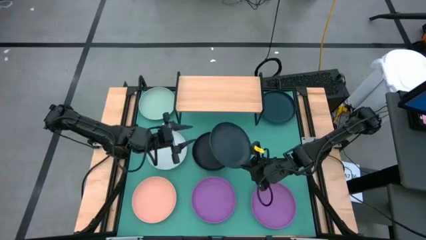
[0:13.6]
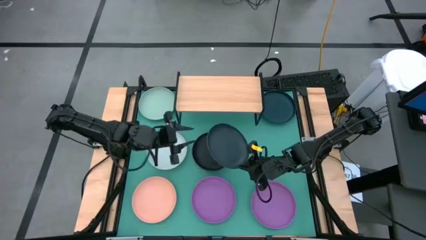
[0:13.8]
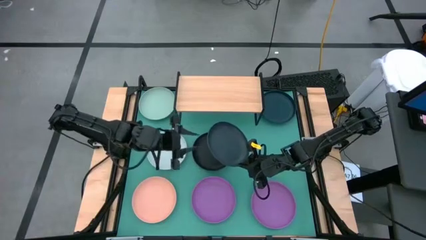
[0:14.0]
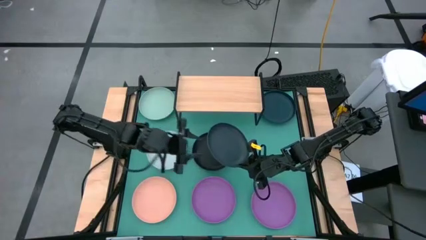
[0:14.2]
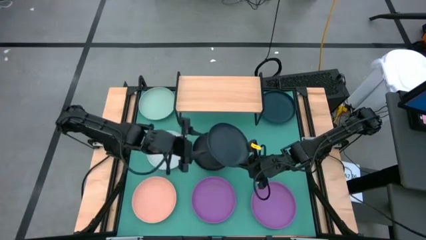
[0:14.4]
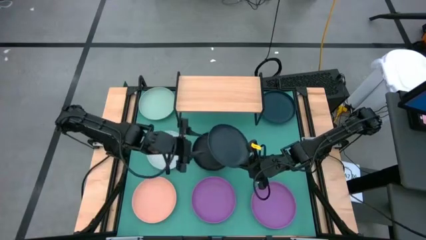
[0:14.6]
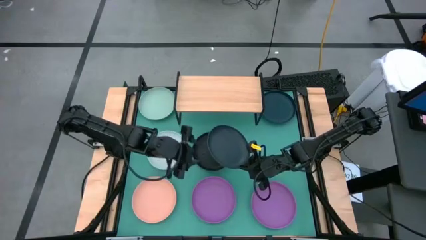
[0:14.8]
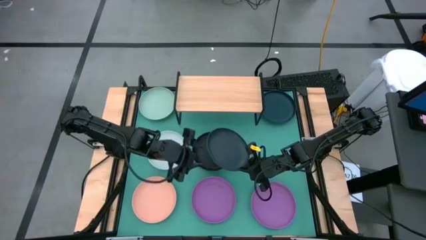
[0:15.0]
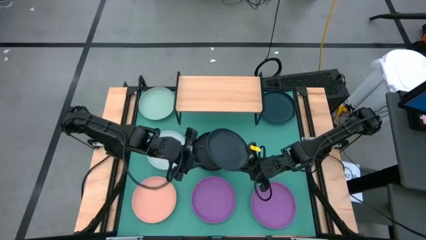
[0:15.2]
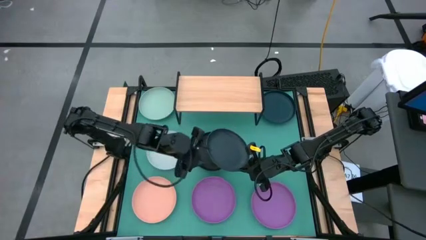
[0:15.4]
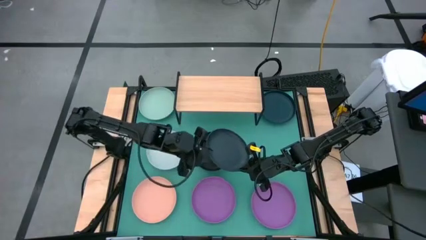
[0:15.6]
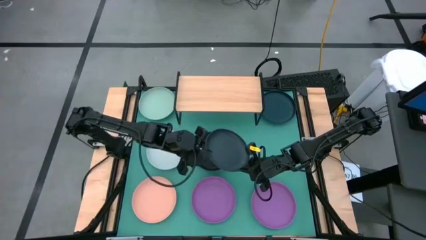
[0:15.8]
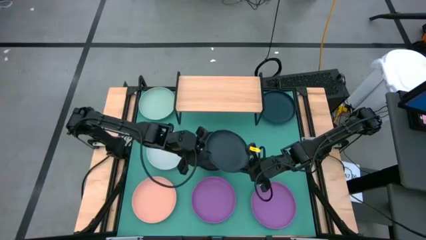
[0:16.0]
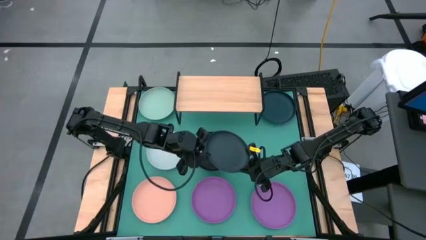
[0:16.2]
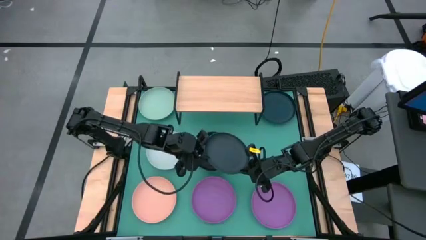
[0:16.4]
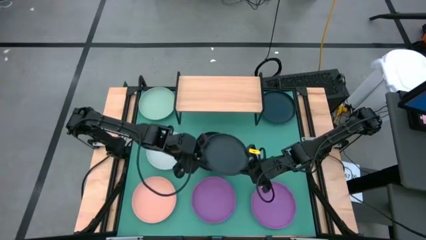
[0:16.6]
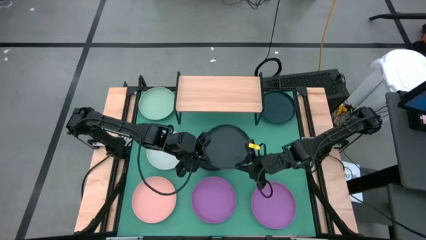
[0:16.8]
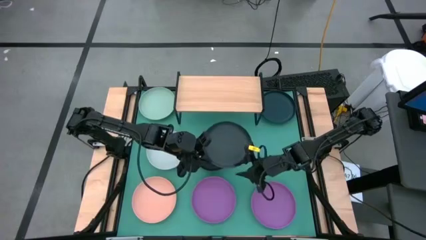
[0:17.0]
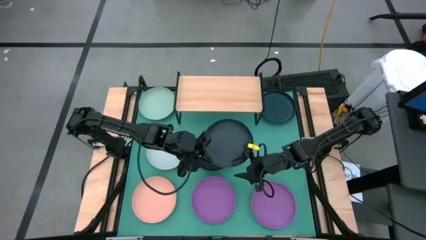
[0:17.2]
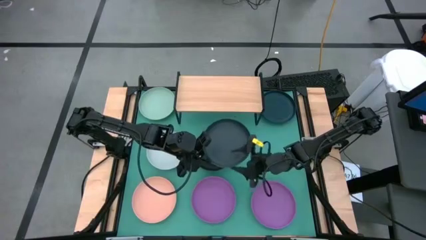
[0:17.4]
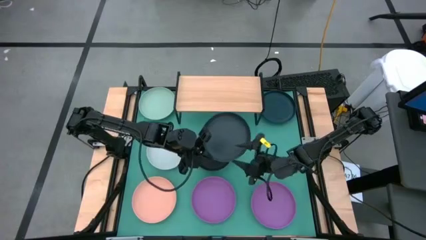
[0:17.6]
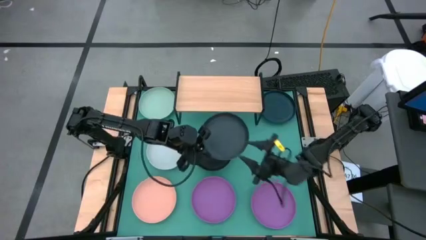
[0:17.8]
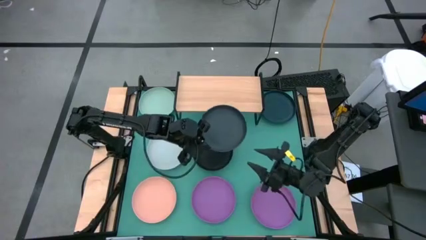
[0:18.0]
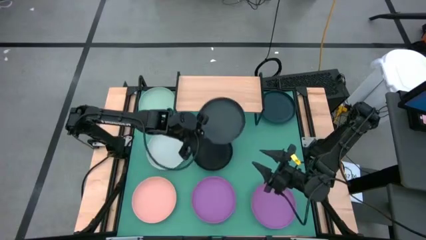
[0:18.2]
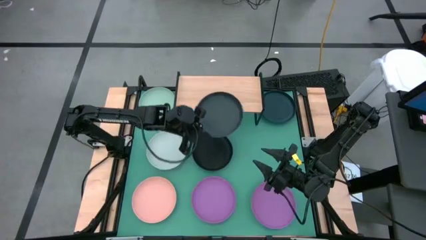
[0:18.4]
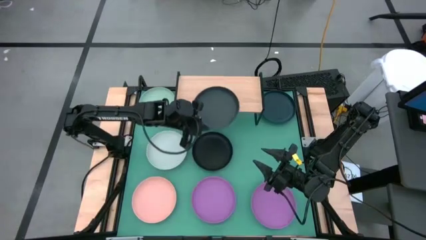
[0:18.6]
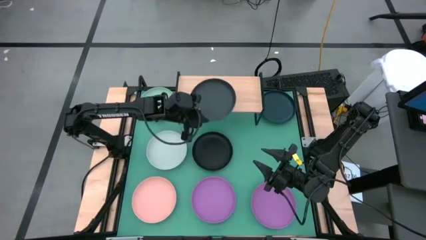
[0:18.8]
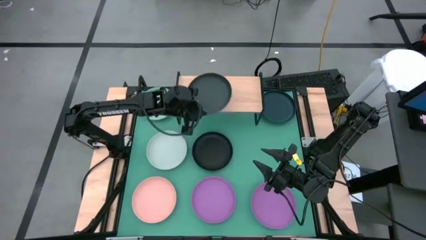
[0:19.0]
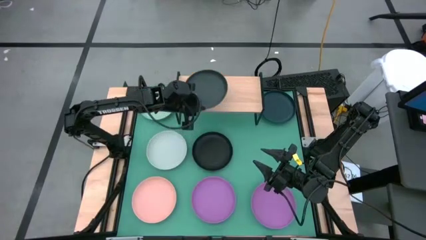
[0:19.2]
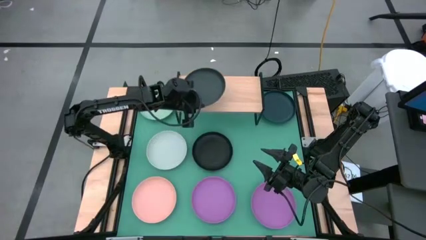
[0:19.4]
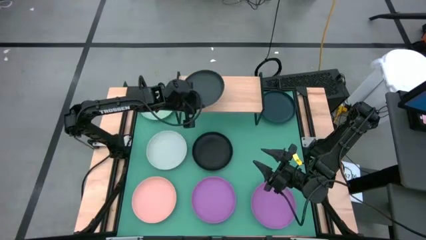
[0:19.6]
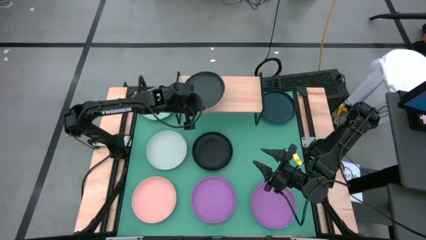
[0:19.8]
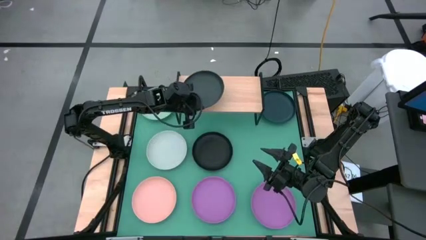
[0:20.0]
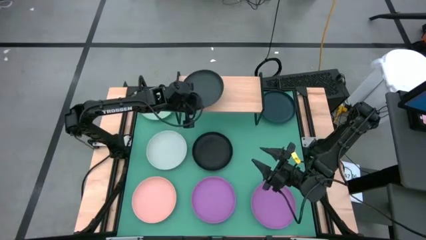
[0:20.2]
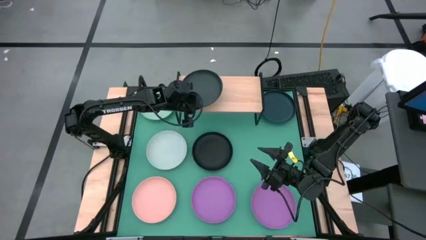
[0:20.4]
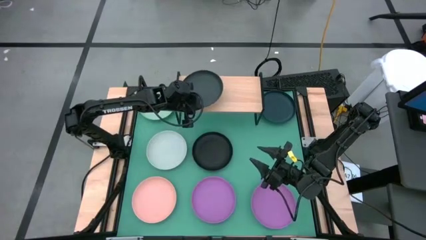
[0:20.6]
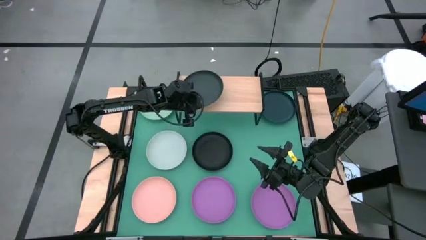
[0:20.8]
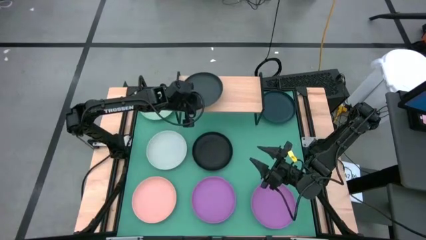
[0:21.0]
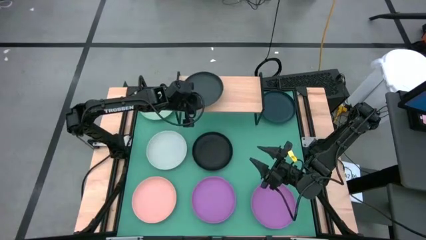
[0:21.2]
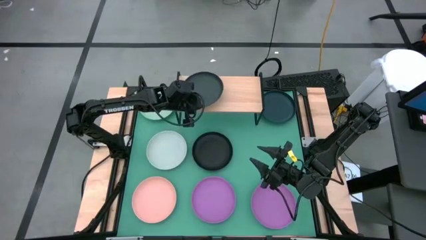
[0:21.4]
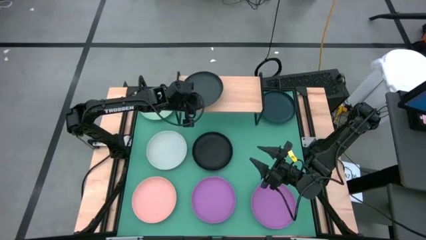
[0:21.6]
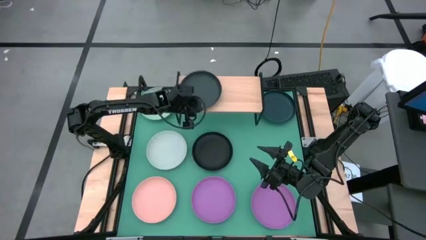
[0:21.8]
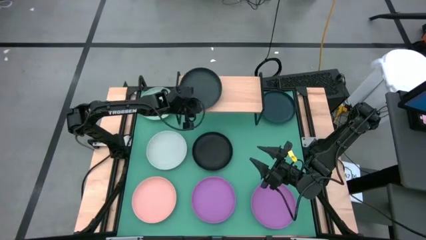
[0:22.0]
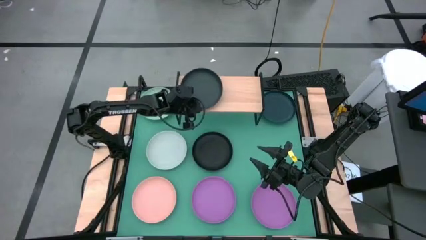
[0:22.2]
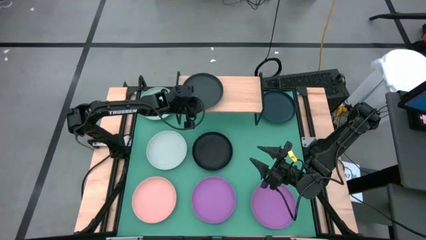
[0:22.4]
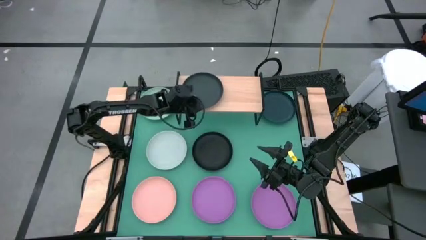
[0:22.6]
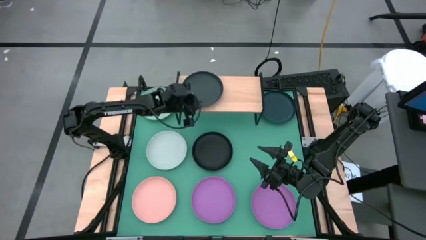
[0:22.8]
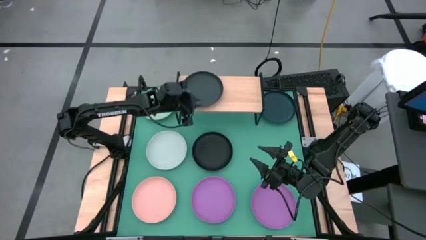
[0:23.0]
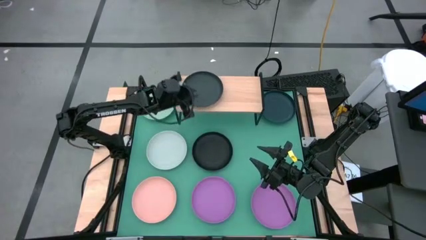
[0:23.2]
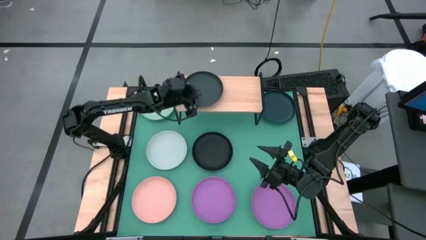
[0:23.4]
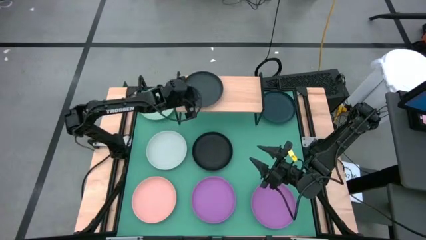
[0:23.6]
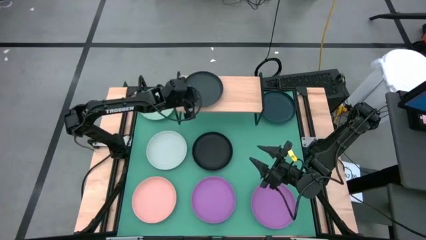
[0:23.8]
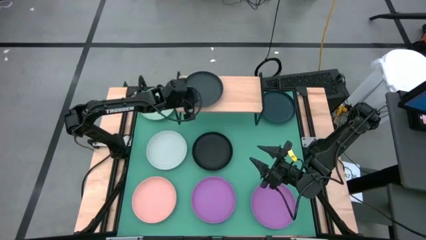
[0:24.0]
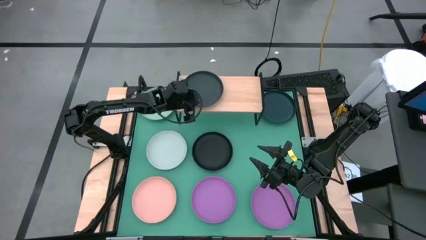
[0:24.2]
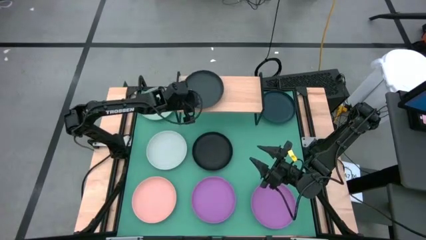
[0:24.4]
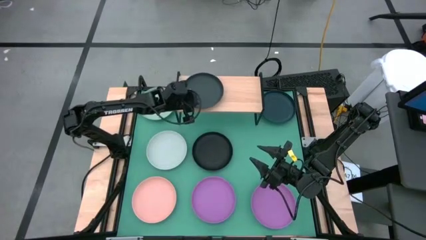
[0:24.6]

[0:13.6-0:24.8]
Task: Place and stack plates onto a shelf
Put the bottom dark blue plate on the shelf

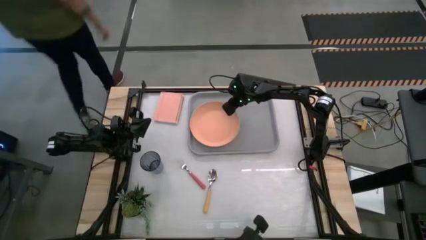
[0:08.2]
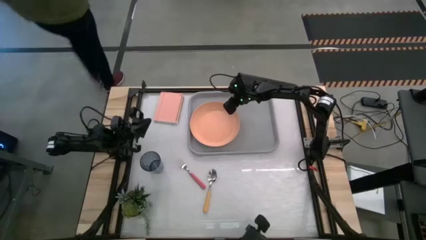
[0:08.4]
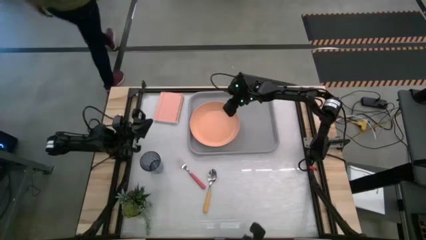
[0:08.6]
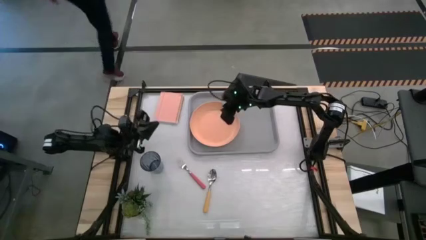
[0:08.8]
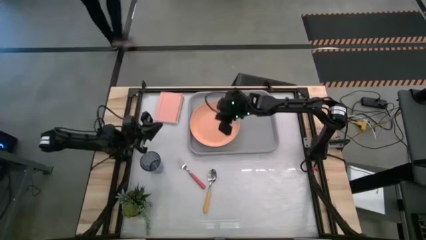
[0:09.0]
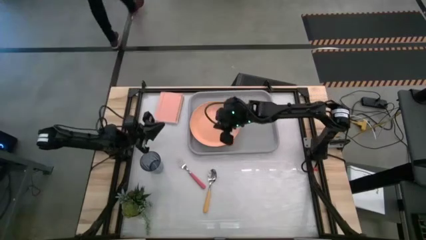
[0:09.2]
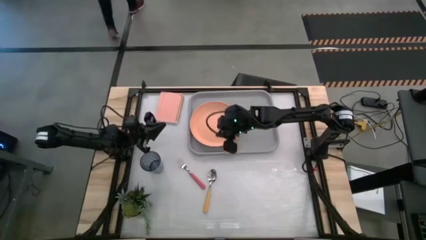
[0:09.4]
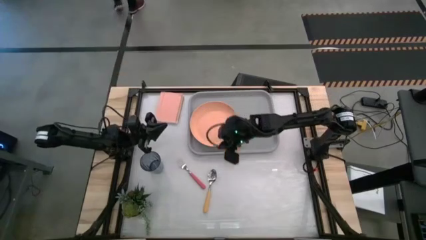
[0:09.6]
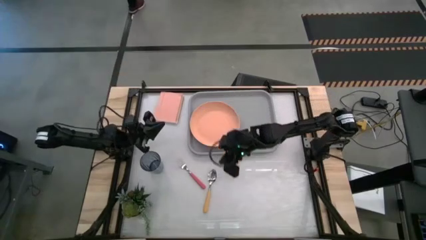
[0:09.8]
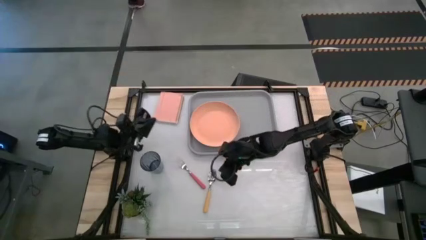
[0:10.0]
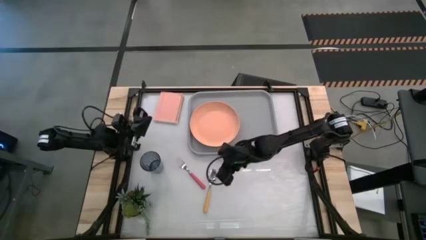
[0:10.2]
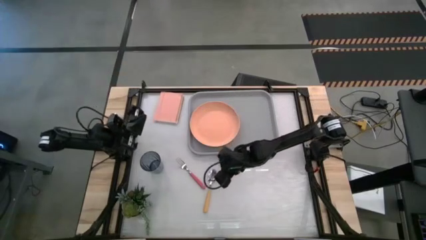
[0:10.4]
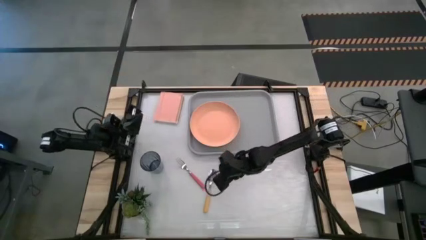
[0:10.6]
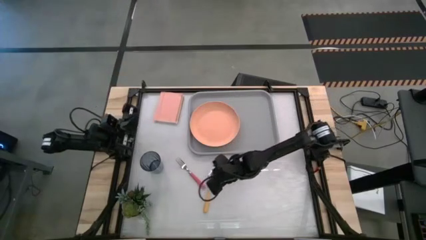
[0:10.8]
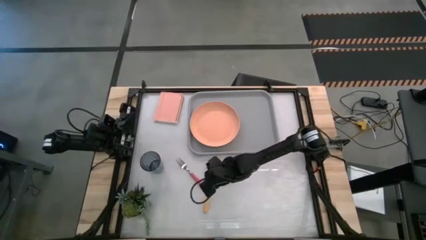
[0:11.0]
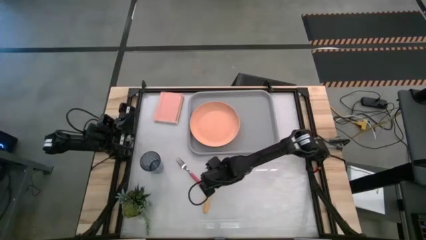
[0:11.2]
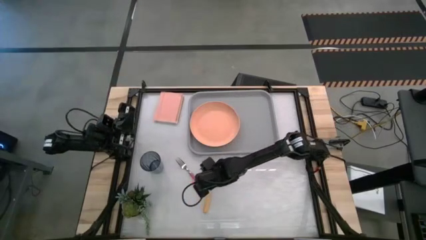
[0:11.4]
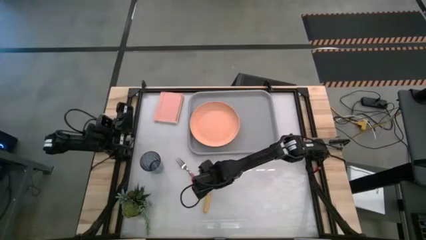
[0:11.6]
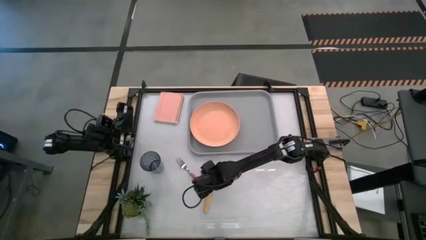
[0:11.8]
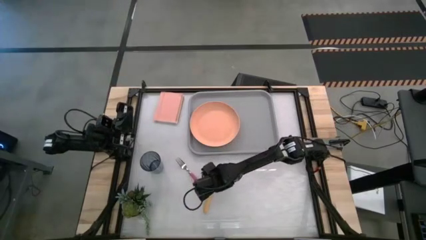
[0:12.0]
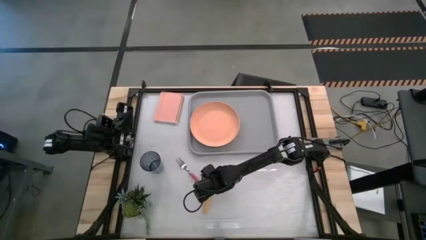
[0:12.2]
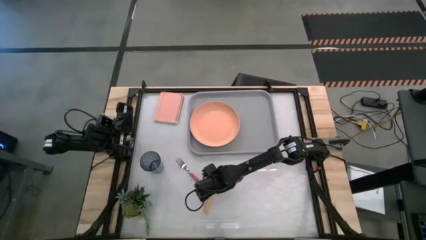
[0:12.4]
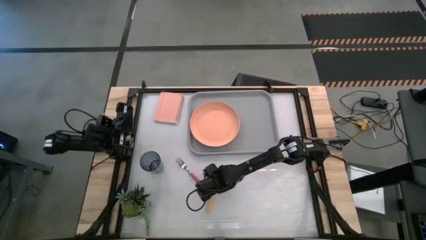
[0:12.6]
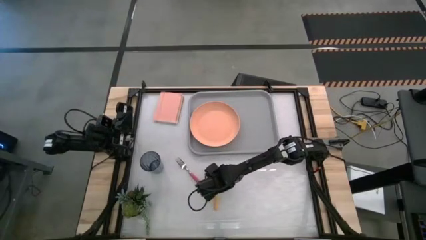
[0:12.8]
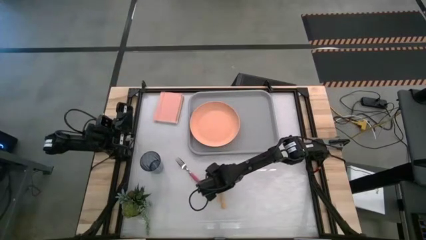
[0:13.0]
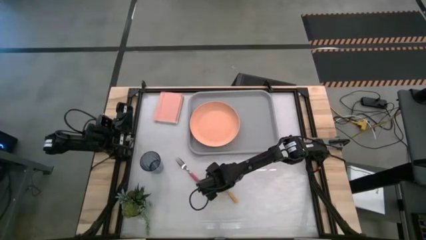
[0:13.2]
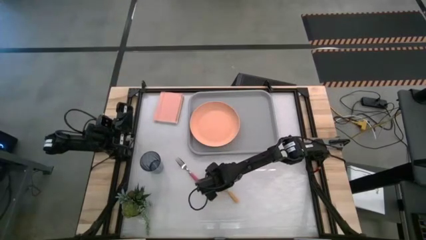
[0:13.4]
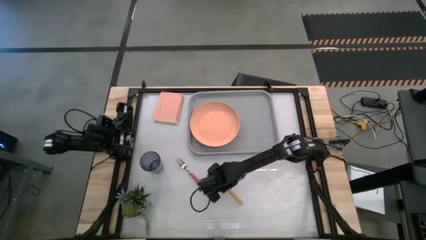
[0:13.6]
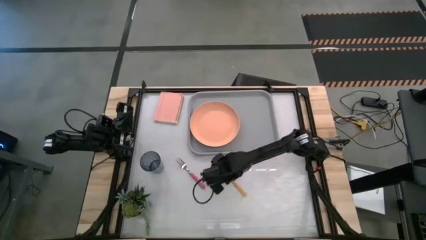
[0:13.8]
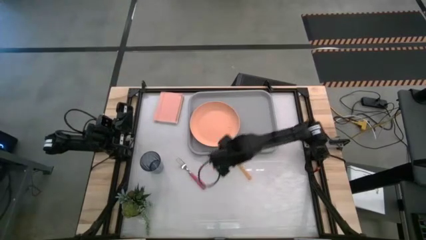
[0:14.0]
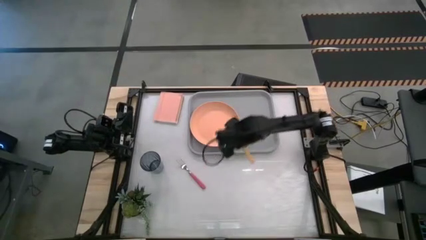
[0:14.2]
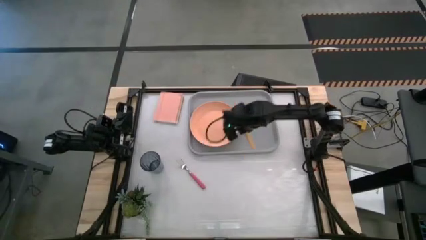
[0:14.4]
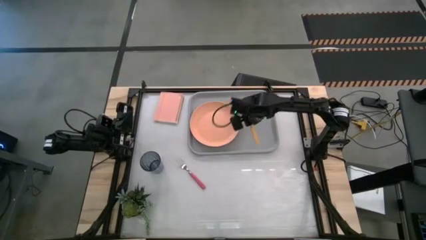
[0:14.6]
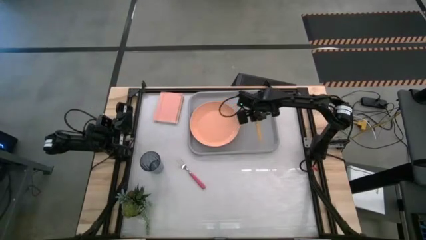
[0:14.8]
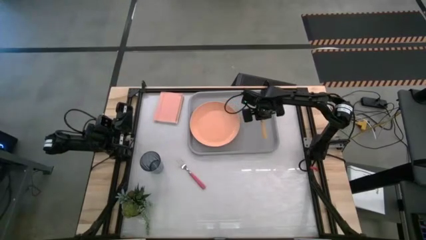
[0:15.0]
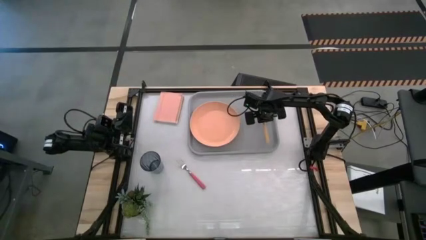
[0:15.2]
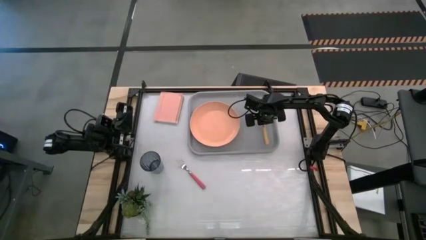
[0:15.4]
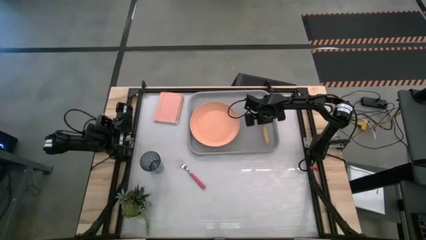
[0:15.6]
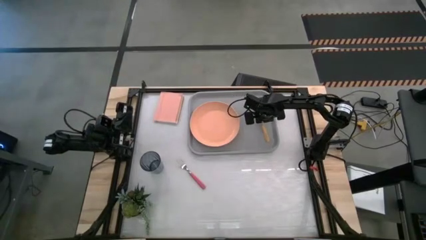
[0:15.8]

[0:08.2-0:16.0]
Task: Pick and place plate/cup/fork/spoon on tray
Put the yellow spoon on the gray tray to the right of the orange plate
